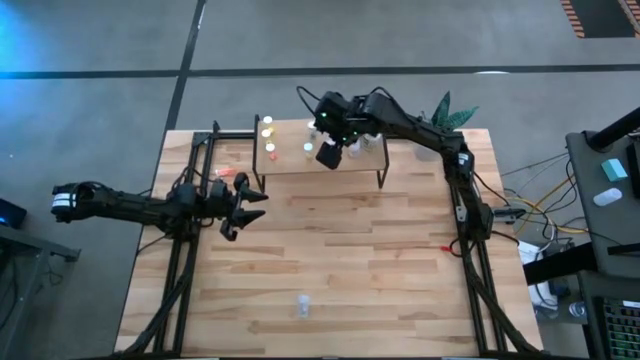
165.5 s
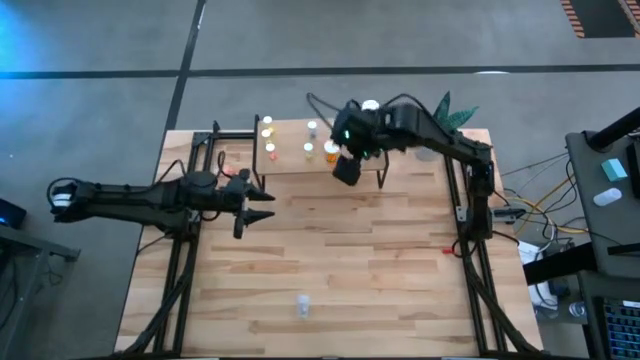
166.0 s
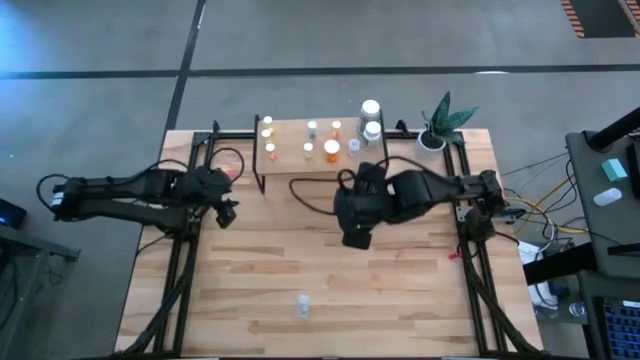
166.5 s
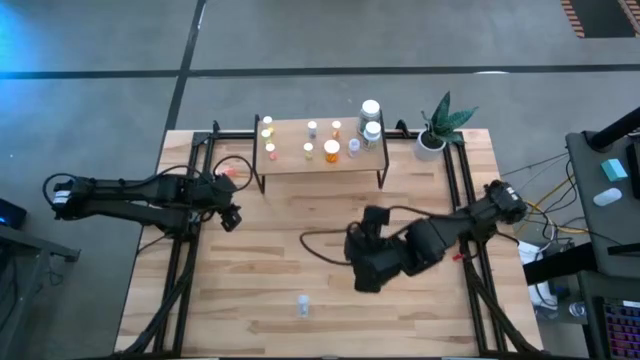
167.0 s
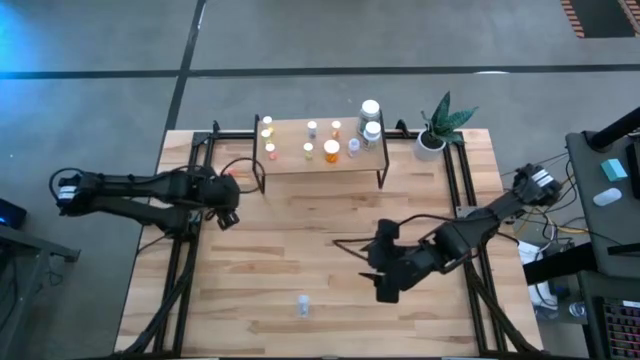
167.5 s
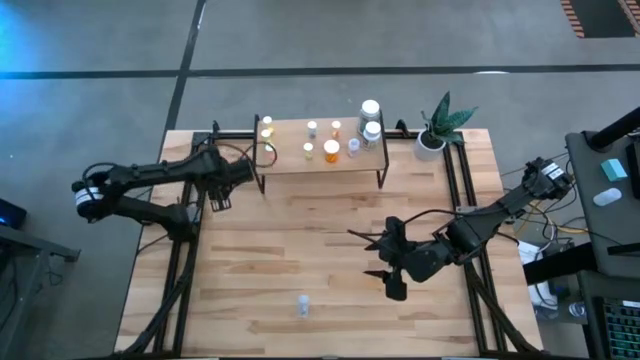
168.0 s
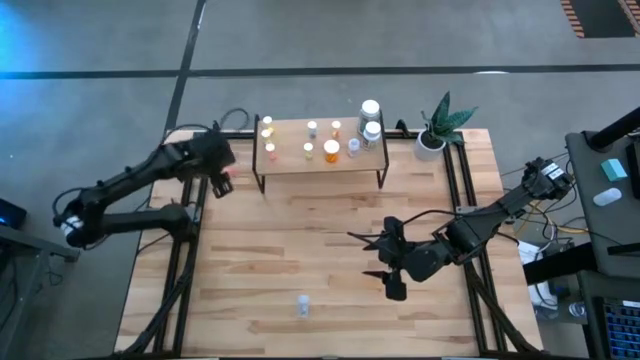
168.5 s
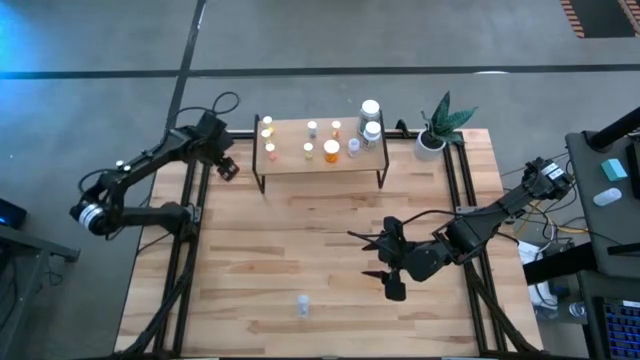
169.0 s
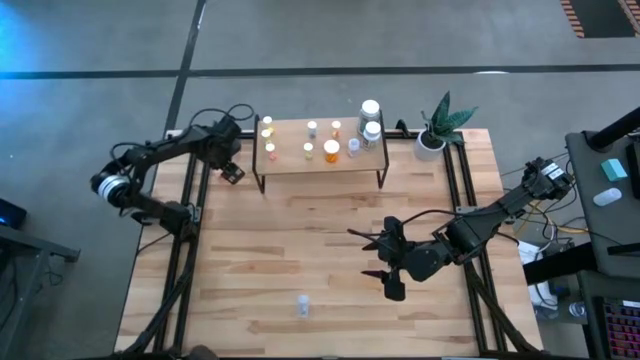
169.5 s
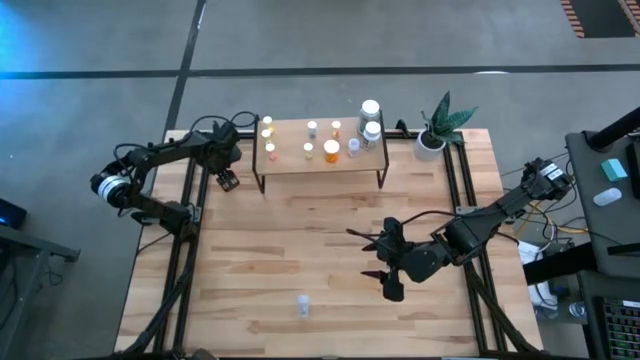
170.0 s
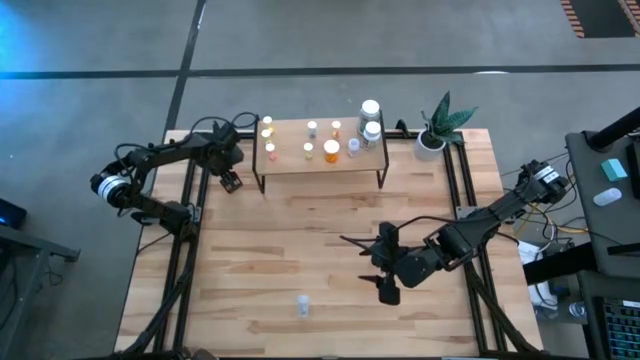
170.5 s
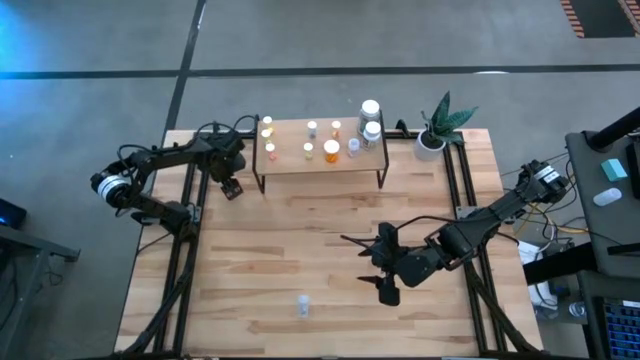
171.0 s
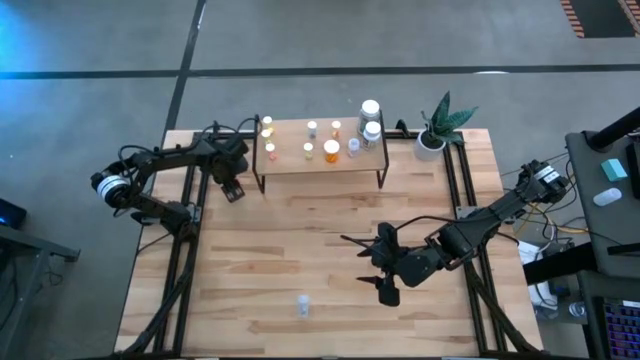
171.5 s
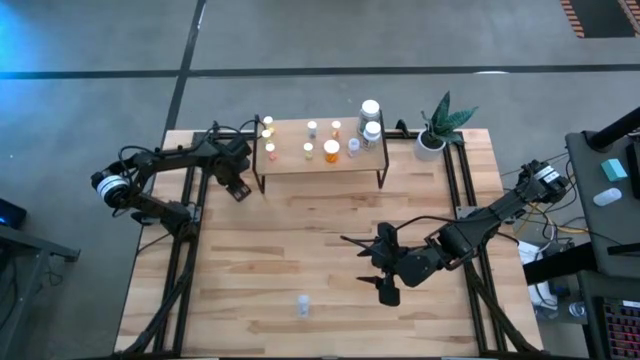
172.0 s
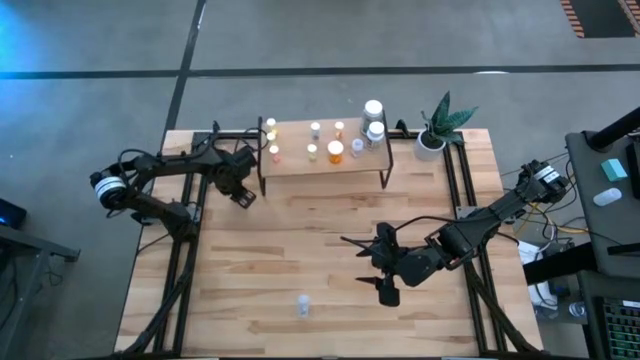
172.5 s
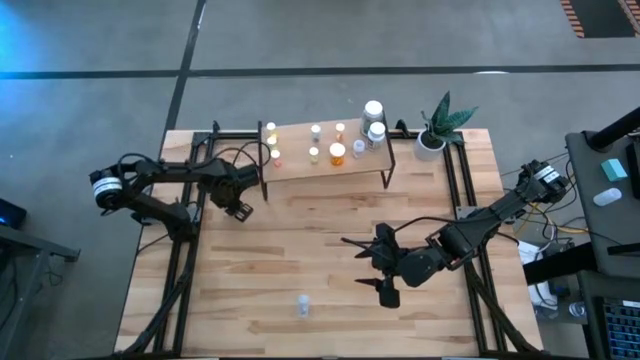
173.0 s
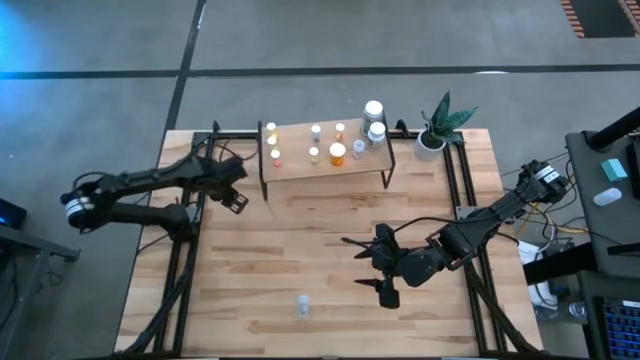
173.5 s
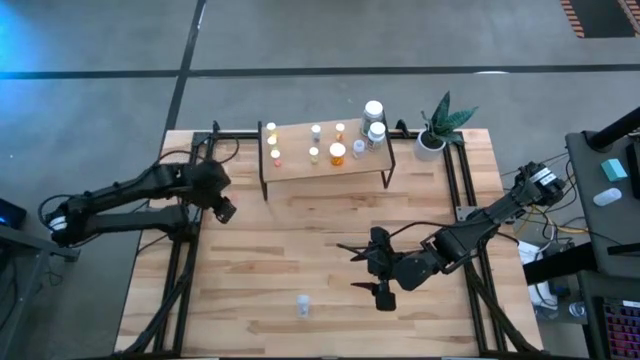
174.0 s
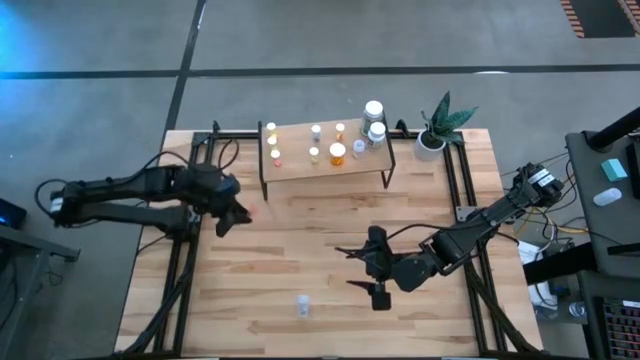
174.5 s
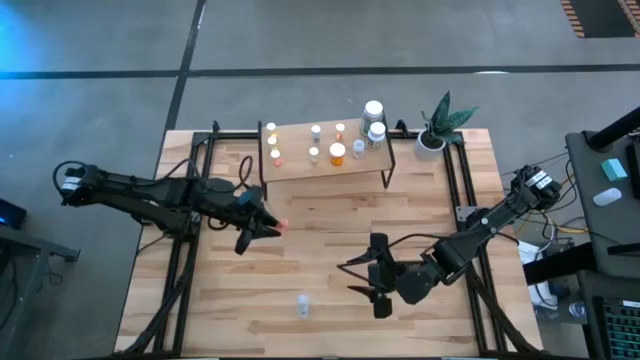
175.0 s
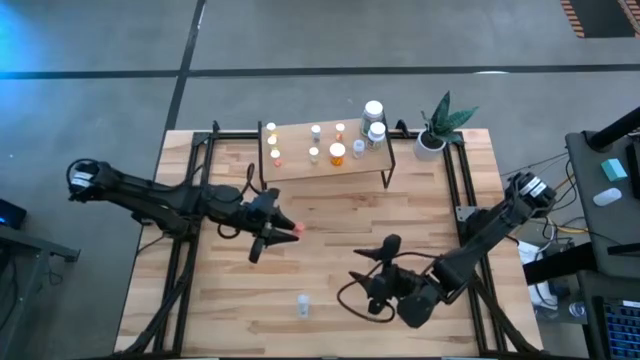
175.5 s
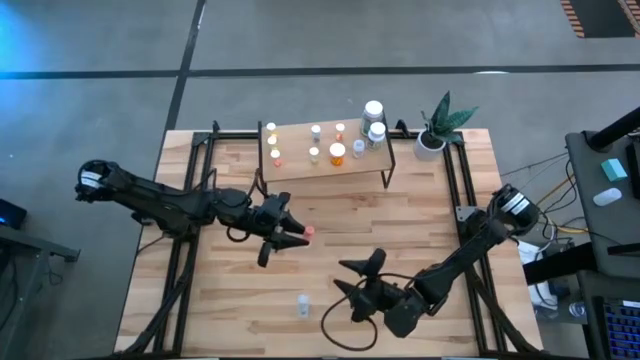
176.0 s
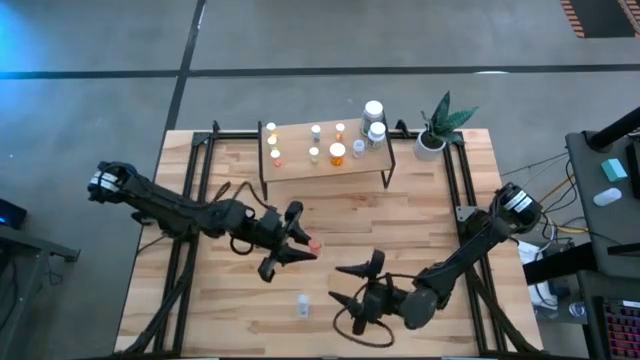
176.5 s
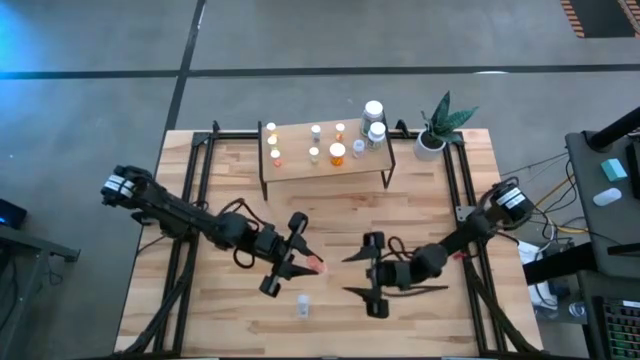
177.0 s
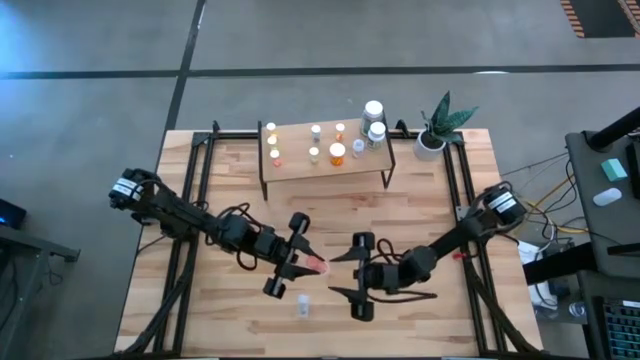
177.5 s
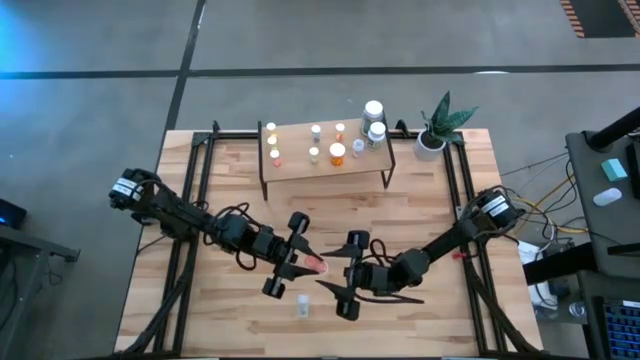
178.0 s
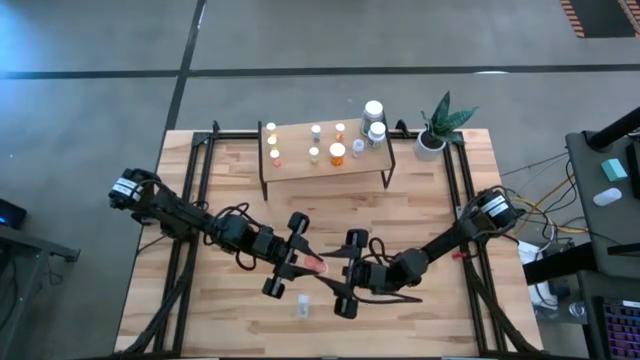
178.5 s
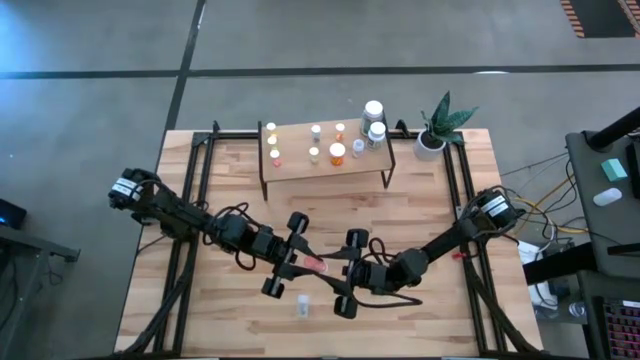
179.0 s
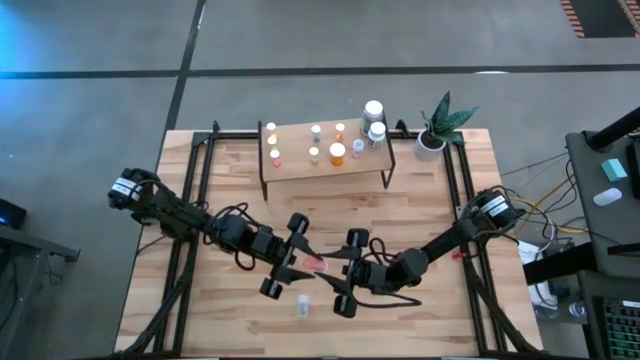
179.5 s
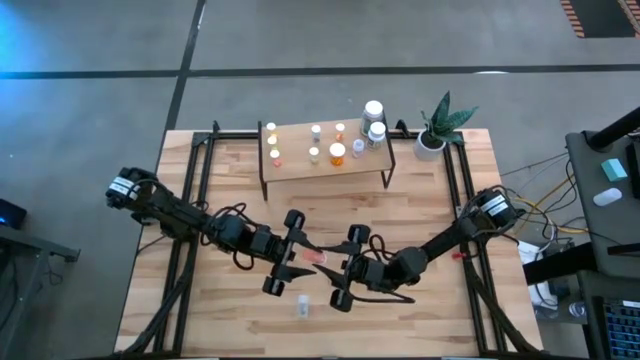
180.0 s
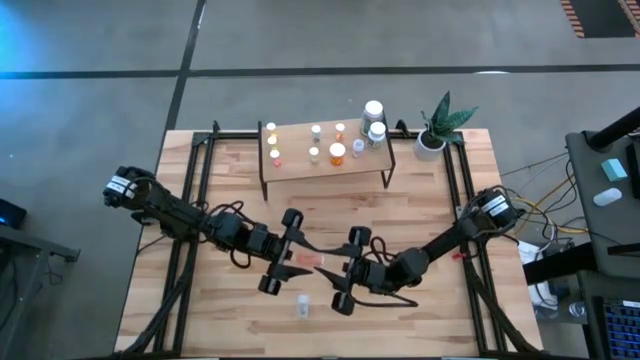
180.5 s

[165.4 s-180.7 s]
Task: Pick and place medicine bottles onto shelf by color
Put the pink pill bottle on the shelf

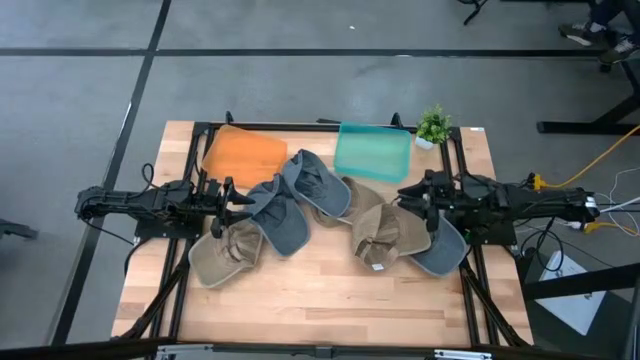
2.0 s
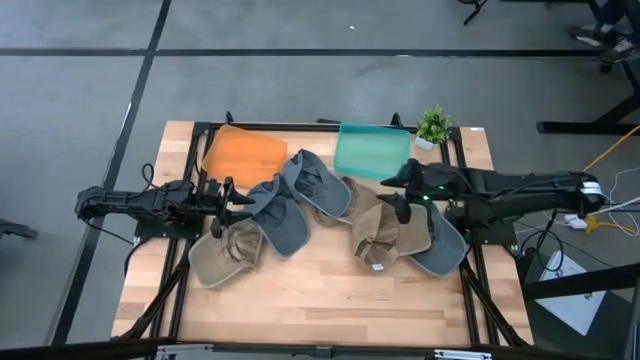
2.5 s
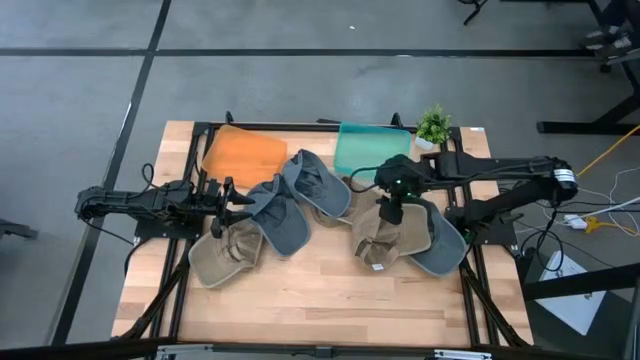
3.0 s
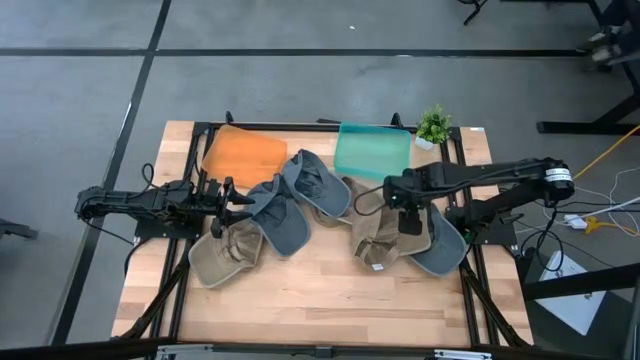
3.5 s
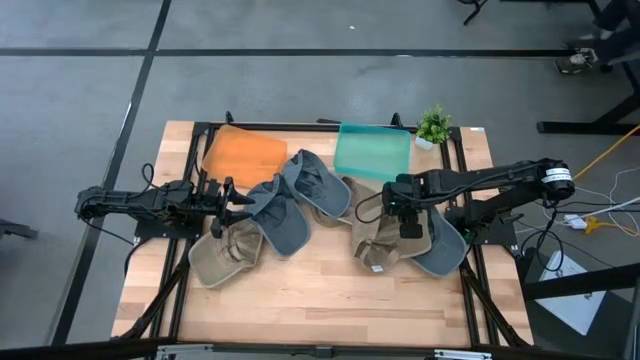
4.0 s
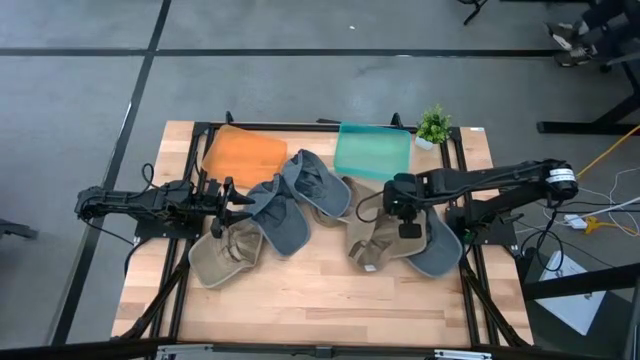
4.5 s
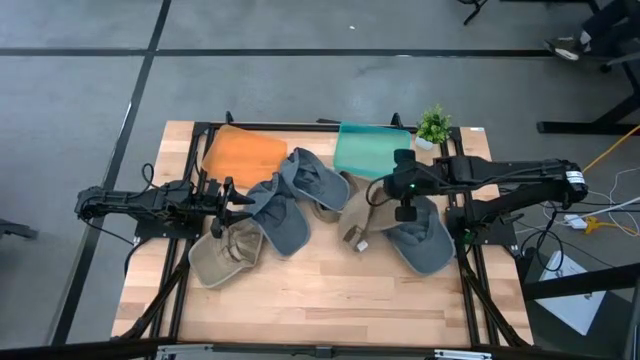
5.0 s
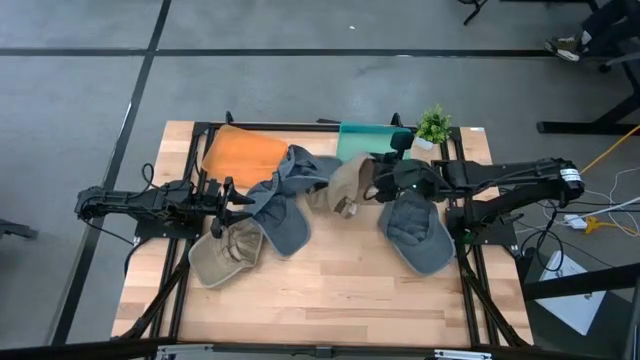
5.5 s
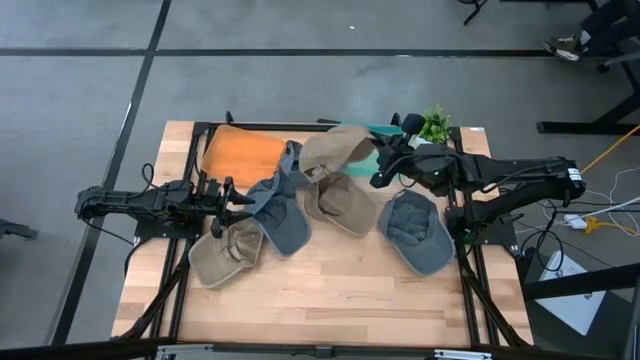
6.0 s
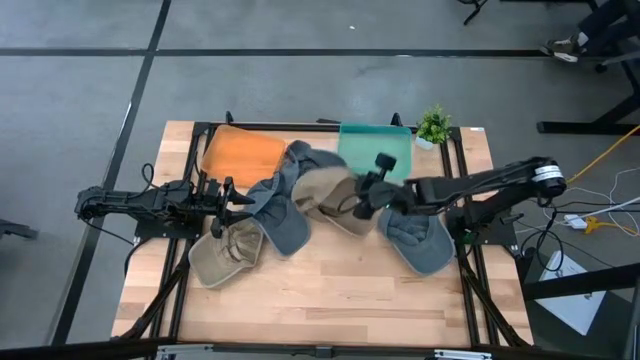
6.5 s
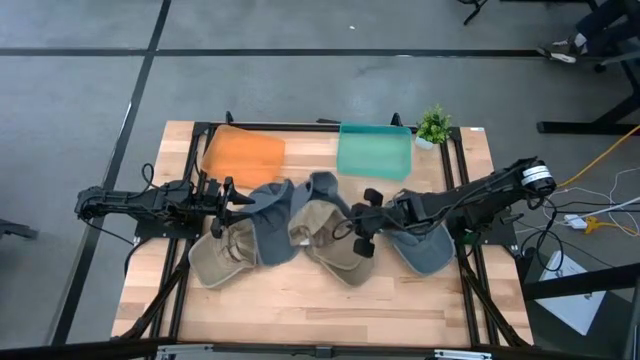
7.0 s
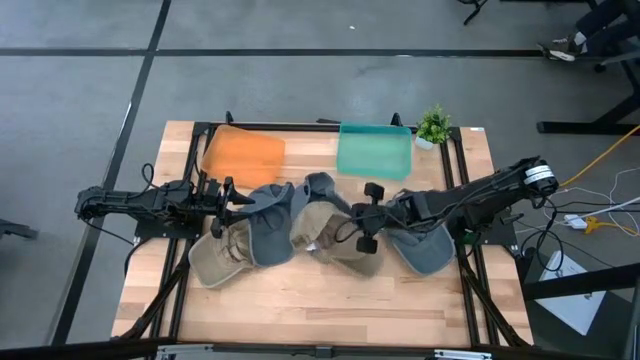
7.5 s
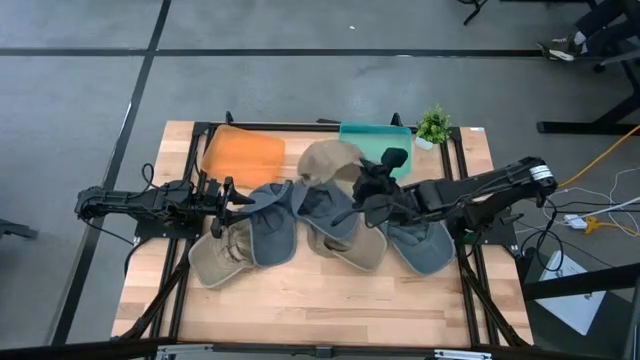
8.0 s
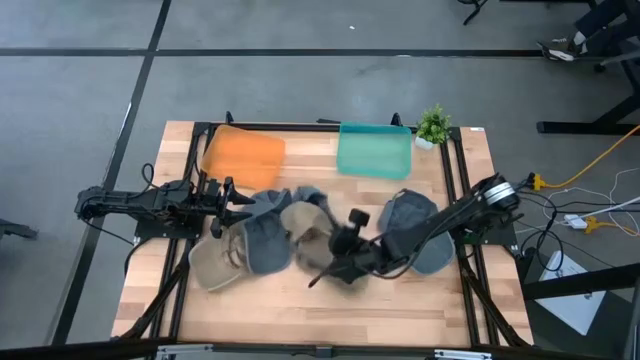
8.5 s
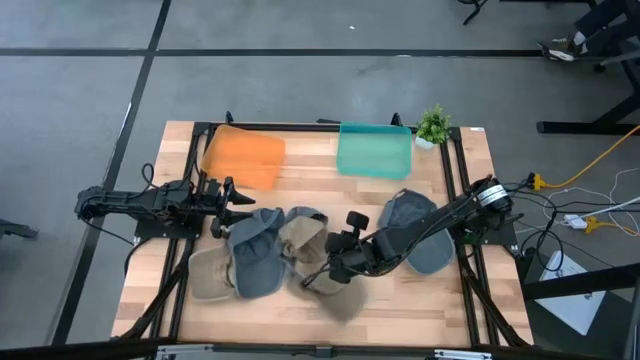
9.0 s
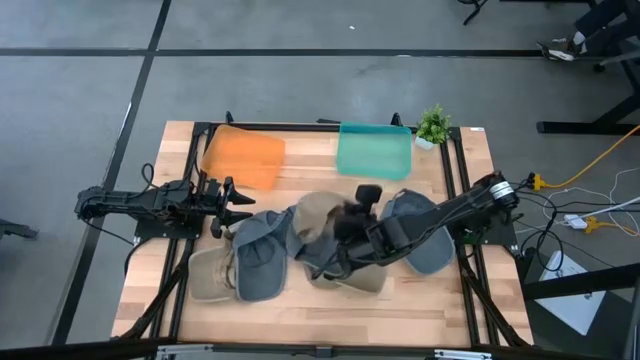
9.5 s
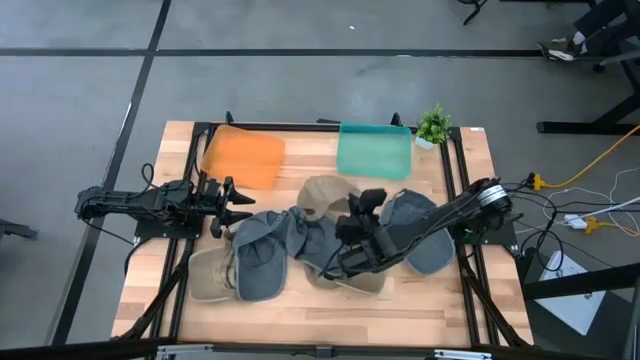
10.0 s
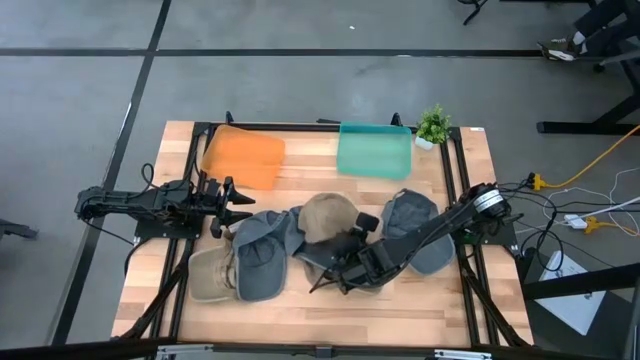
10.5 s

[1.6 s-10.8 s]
Task: Pick & Place hat
Prepare the brown cap
